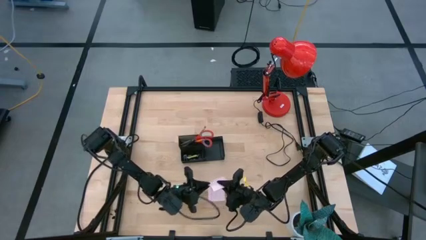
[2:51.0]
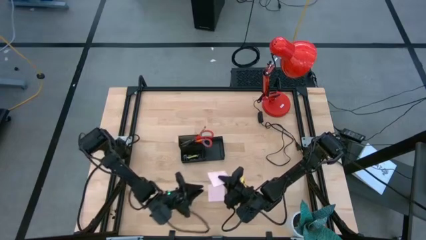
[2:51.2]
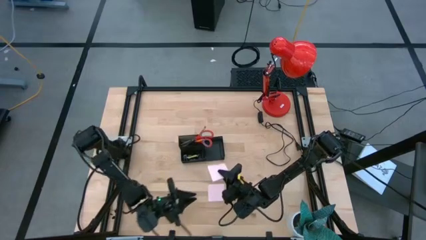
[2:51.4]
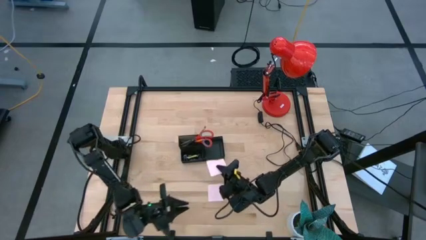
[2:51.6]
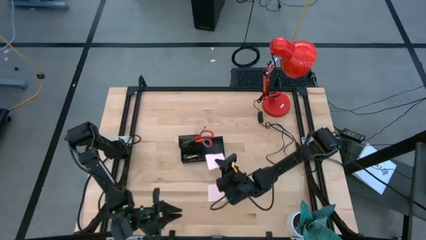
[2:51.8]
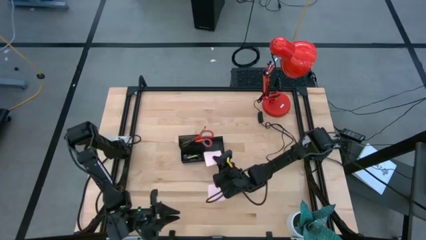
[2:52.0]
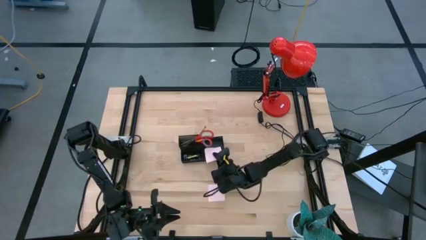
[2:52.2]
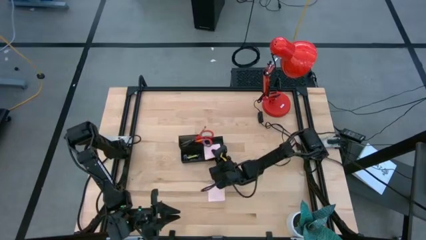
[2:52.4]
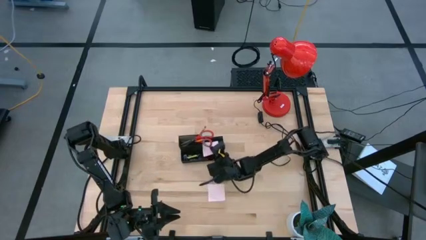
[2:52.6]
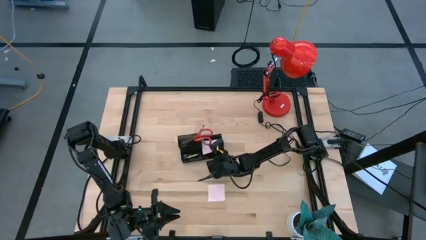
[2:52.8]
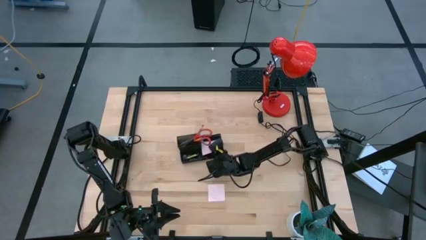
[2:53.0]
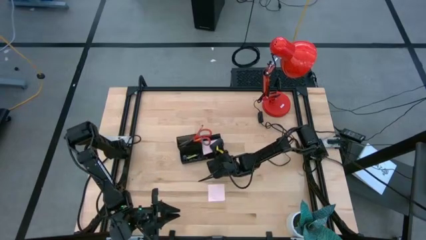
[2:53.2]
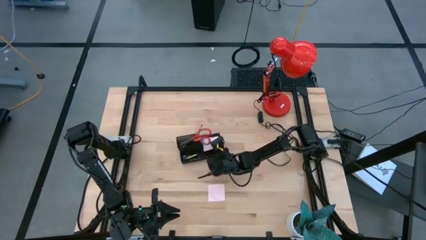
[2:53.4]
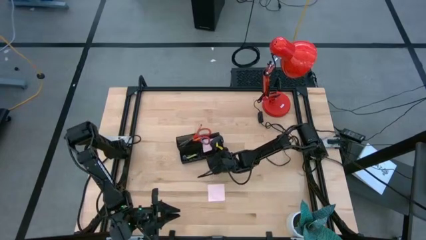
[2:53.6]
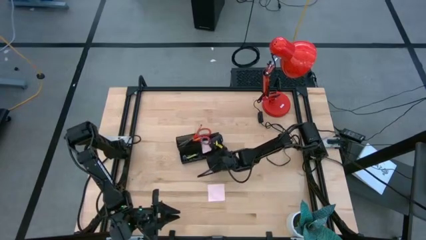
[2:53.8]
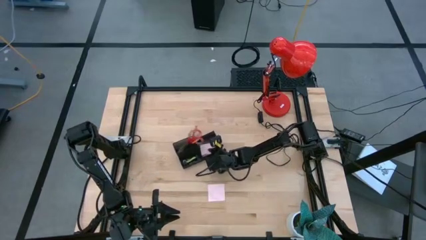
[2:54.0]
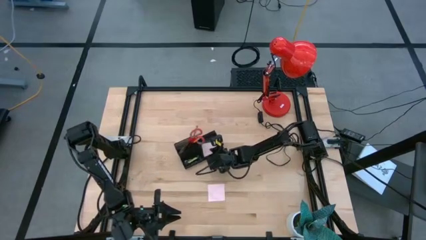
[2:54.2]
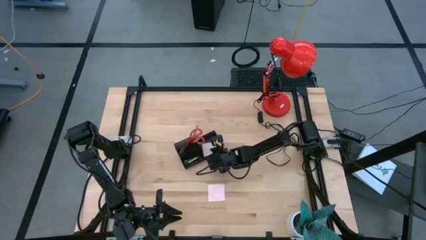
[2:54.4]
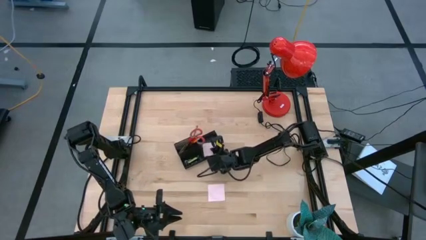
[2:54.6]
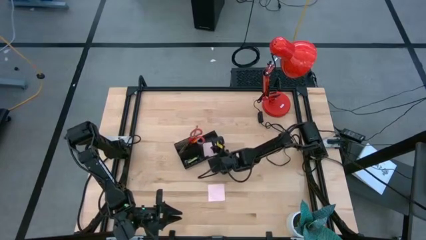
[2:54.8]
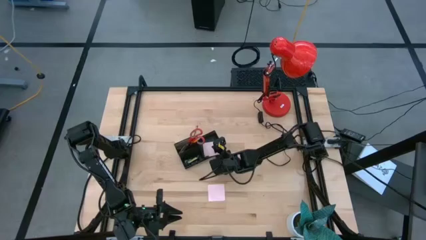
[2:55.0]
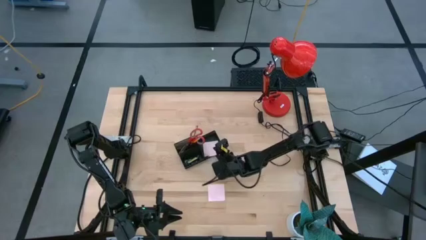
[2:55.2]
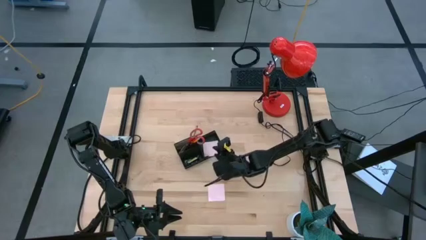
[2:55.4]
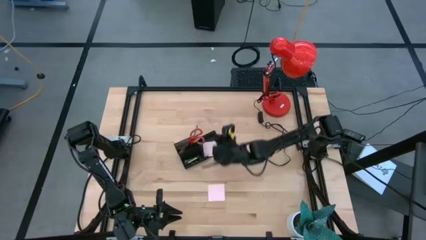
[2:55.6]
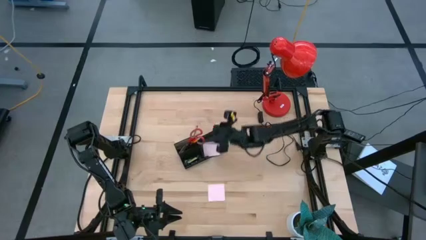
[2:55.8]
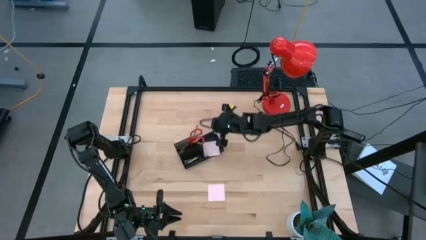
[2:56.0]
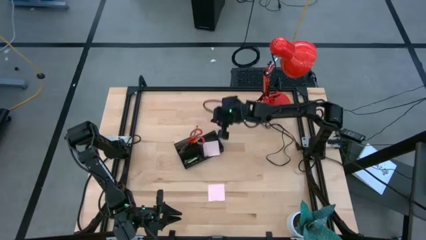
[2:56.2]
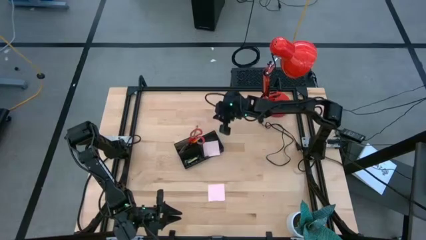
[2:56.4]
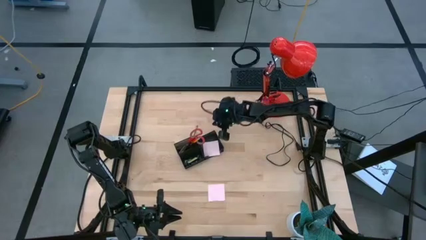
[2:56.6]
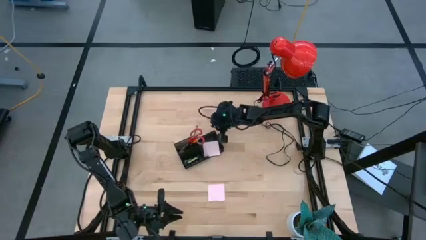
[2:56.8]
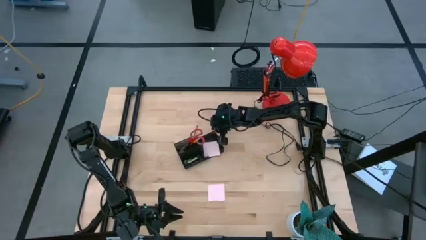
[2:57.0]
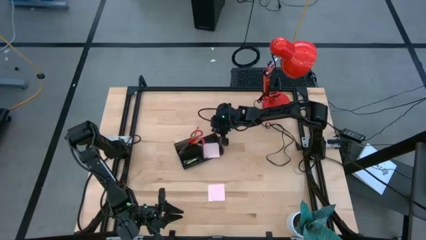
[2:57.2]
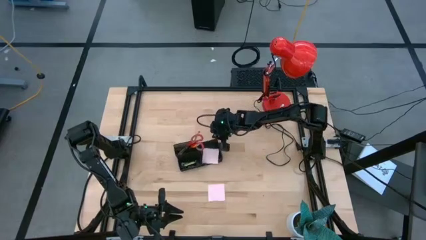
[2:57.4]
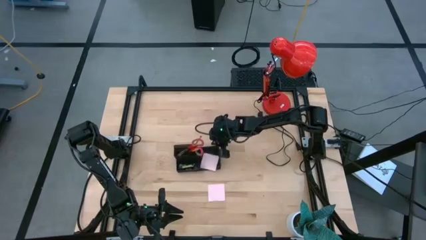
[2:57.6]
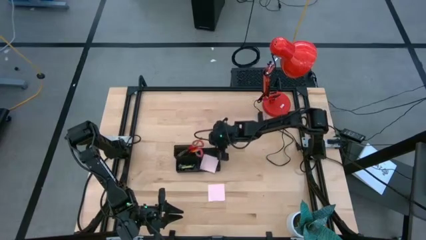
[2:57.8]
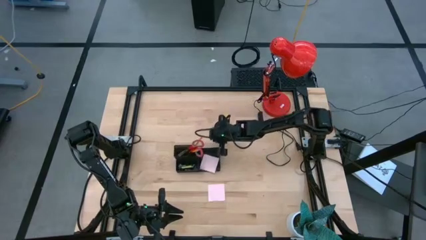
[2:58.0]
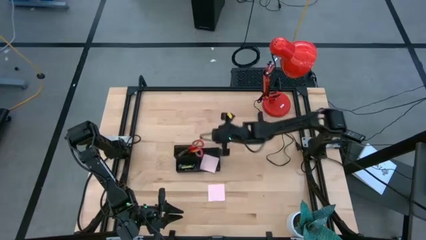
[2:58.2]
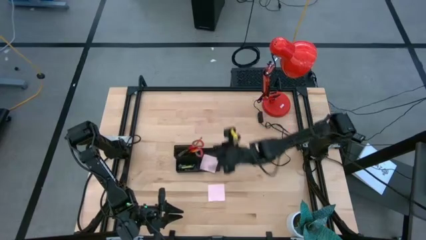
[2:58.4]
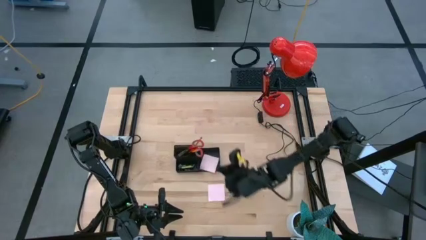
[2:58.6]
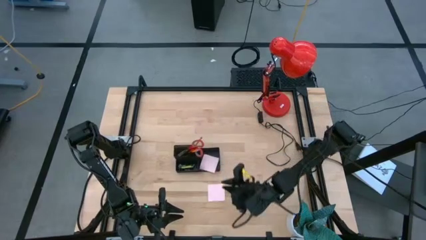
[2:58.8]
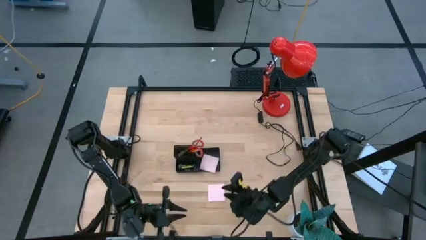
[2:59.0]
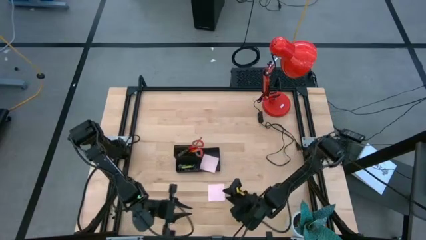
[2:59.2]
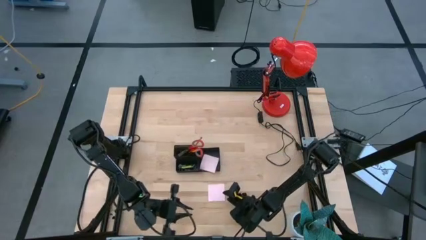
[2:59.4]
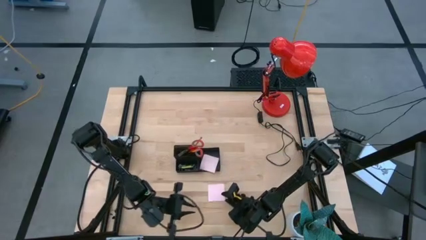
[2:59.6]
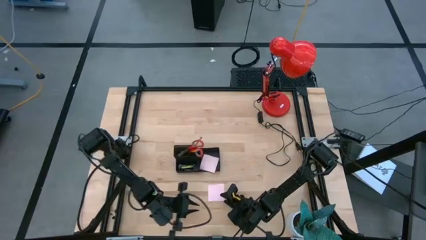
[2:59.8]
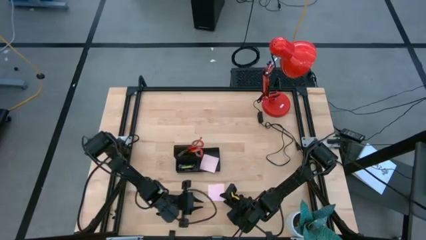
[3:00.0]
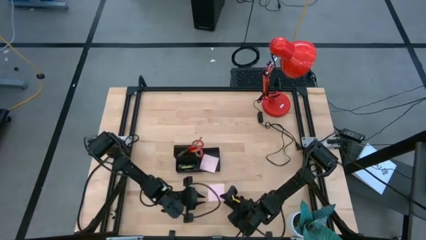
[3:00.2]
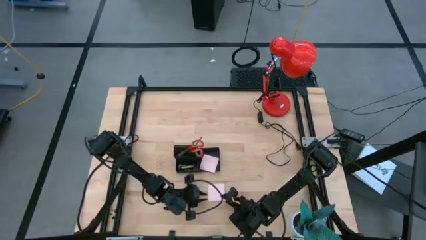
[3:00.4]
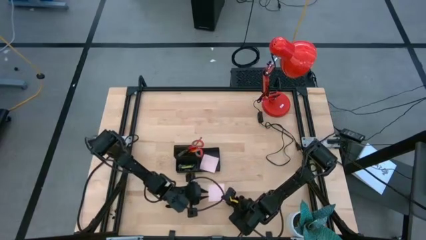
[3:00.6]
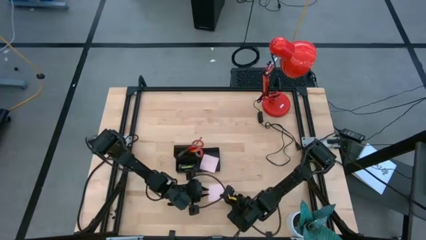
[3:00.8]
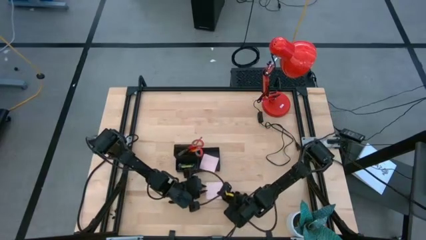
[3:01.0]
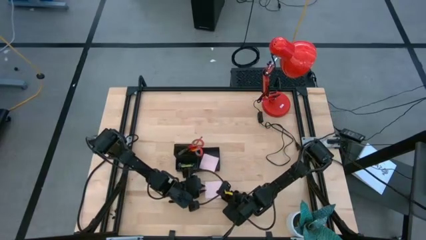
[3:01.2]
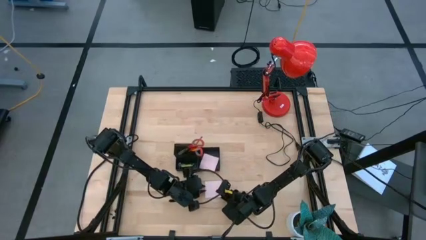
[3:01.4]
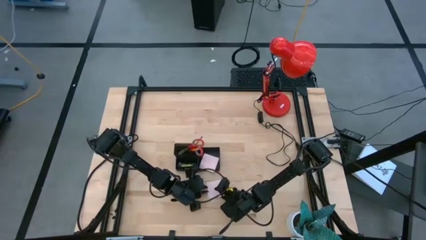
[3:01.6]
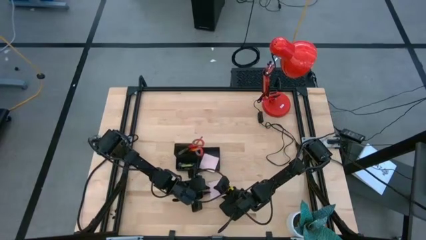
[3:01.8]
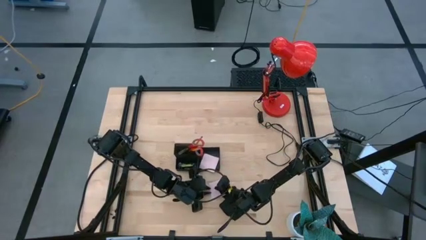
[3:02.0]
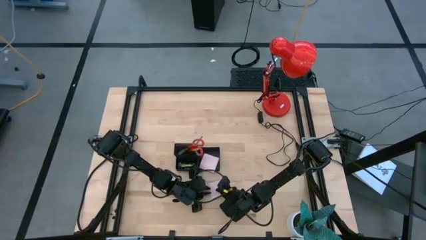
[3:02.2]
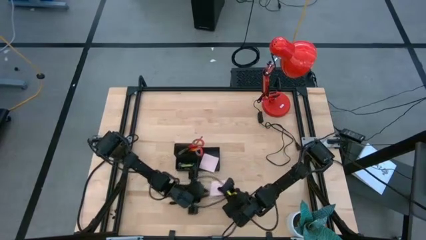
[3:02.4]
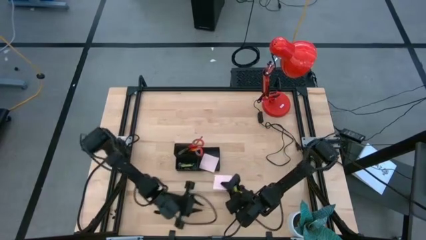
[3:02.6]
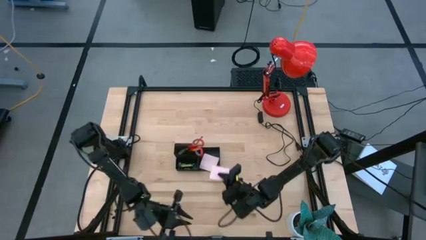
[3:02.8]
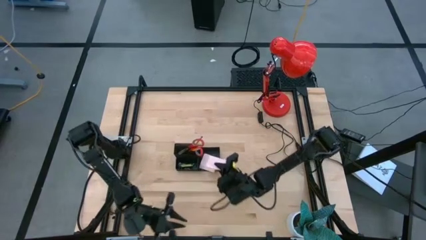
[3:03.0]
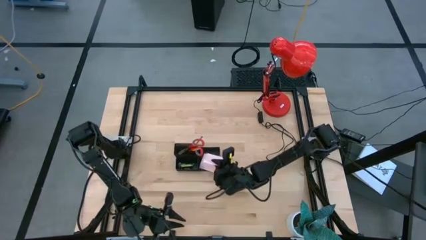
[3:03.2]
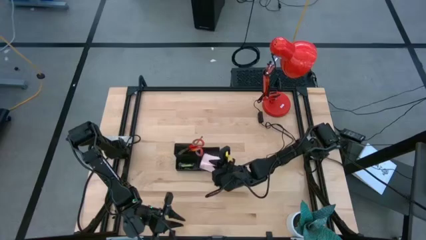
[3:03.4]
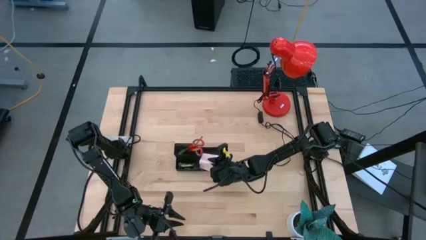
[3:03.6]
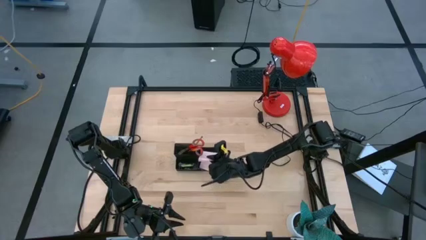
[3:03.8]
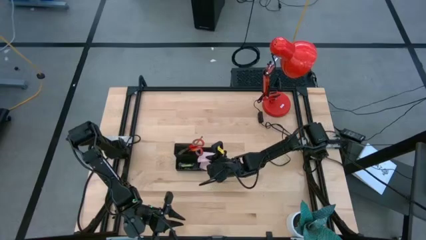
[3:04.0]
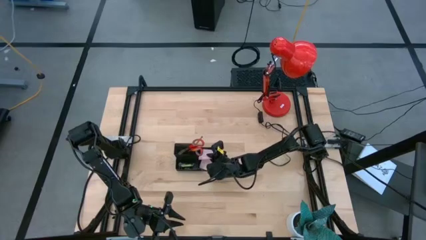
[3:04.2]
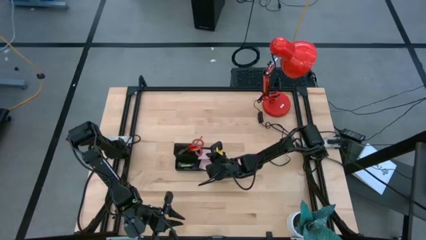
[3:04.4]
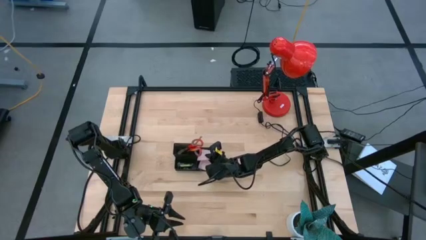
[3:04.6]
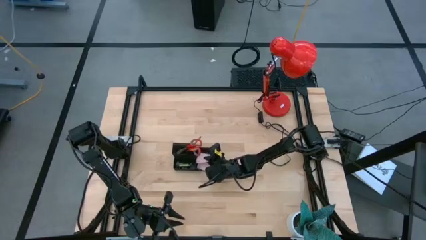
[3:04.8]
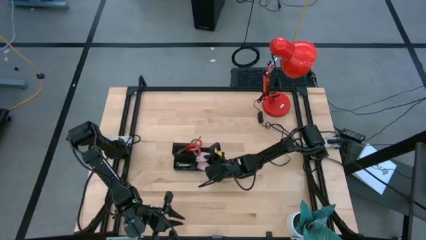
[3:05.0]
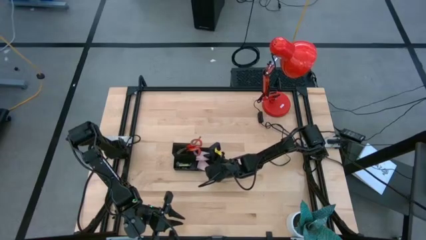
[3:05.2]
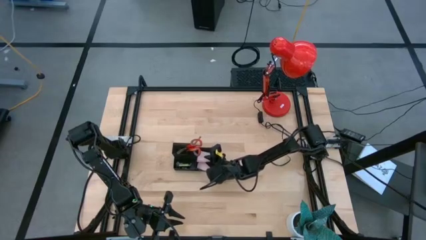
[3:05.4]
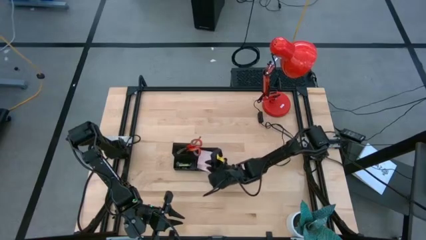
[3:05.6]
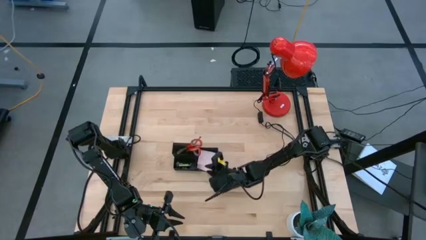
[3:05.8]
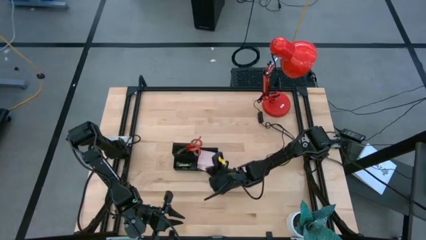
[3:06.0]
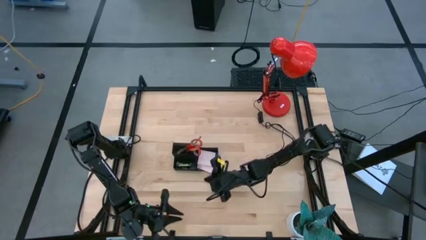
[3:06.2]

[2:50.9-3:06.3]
Task: Pick and place office supplies into organizer
Put the pink sticky note into the mesh desk organizer
